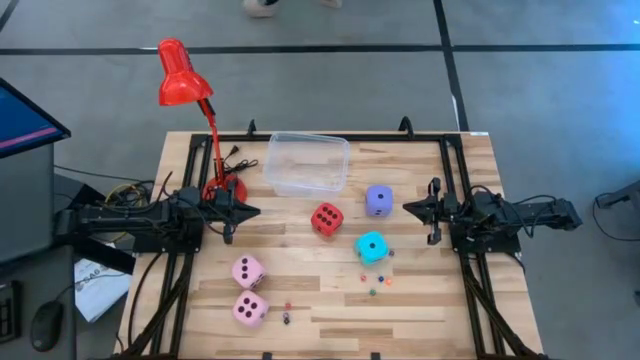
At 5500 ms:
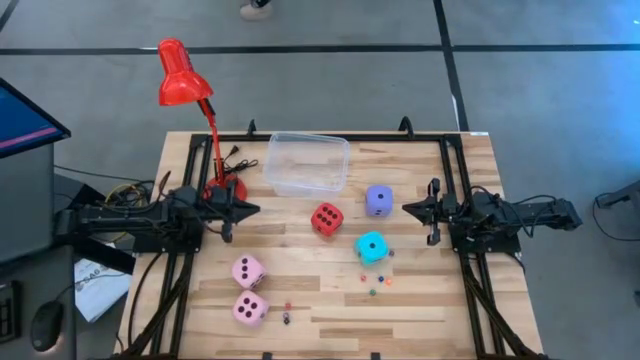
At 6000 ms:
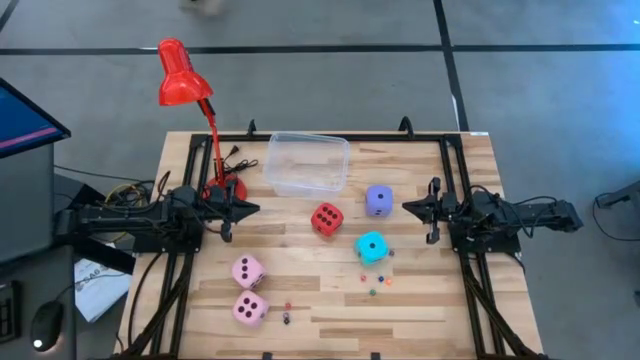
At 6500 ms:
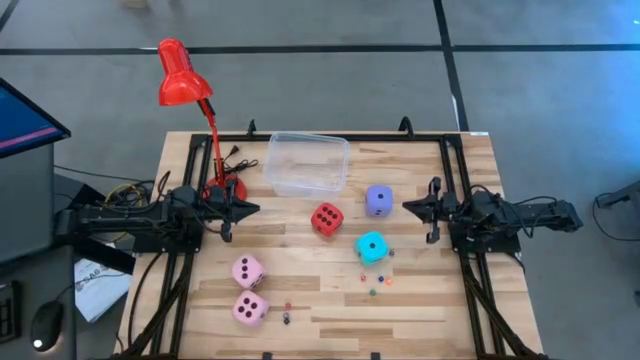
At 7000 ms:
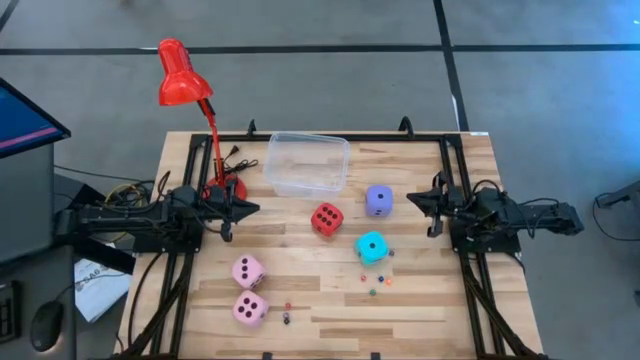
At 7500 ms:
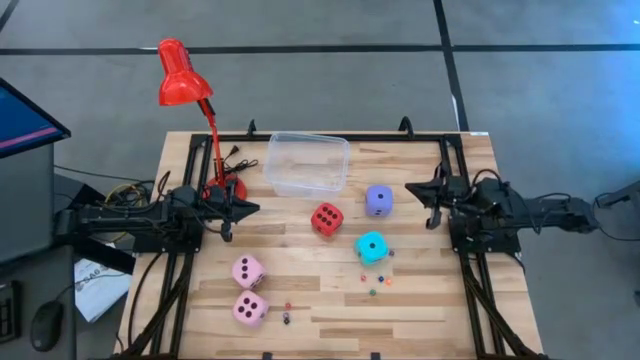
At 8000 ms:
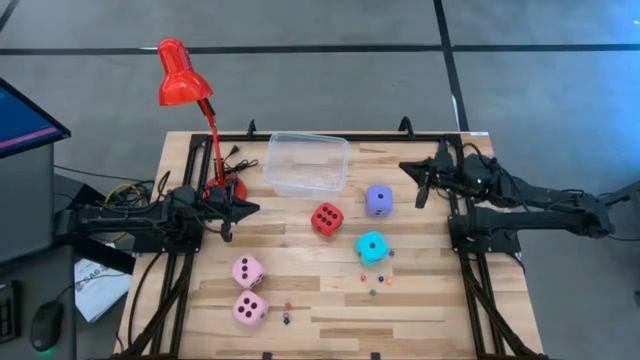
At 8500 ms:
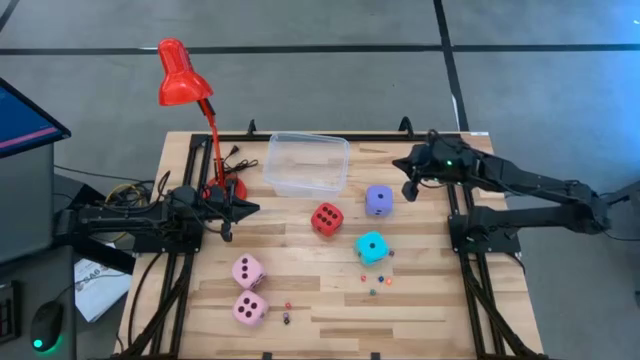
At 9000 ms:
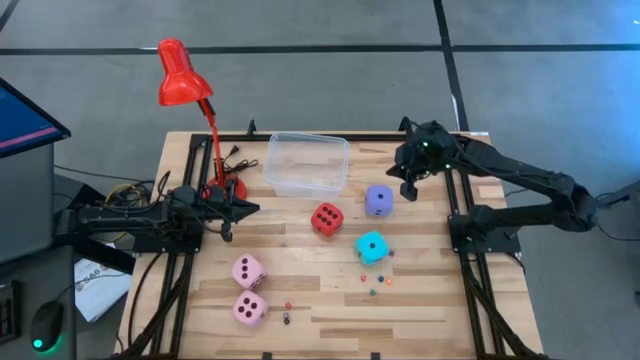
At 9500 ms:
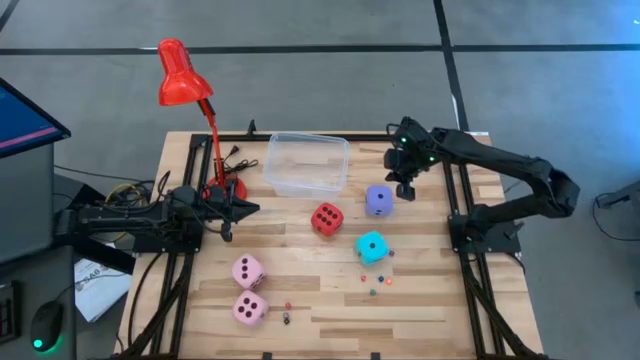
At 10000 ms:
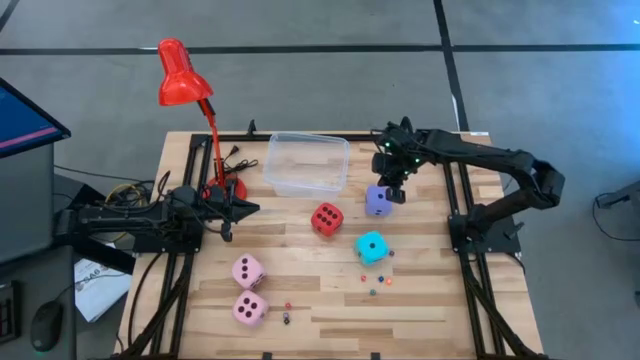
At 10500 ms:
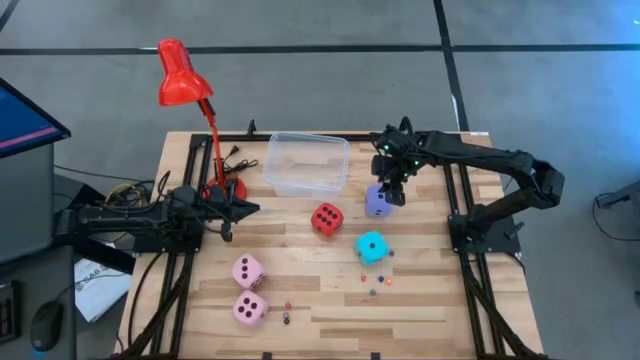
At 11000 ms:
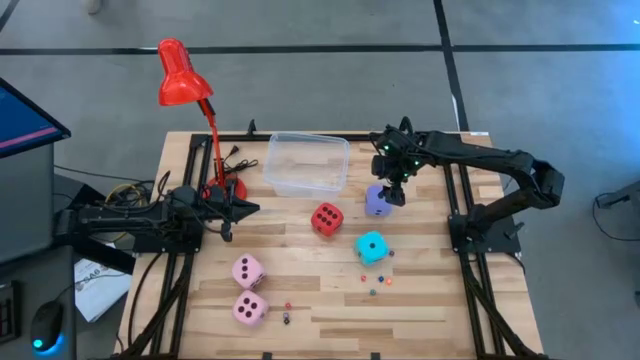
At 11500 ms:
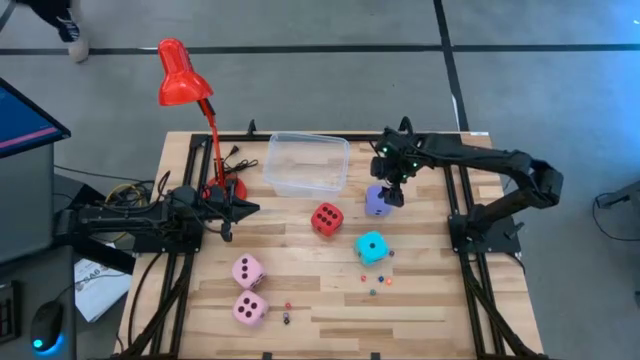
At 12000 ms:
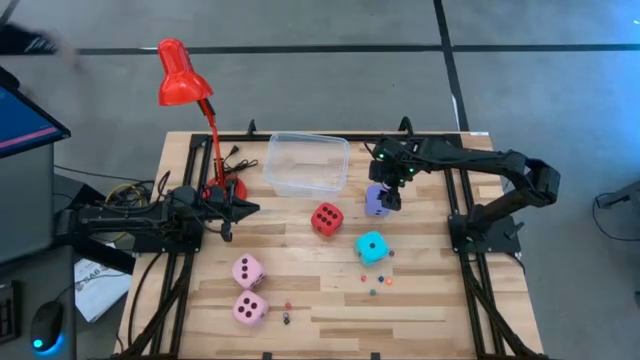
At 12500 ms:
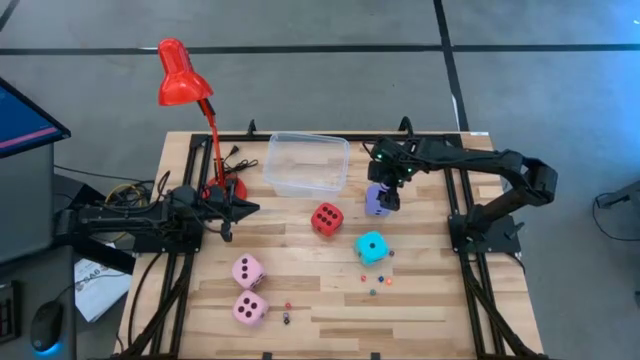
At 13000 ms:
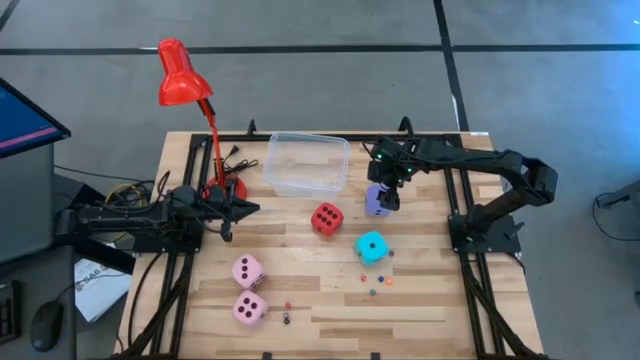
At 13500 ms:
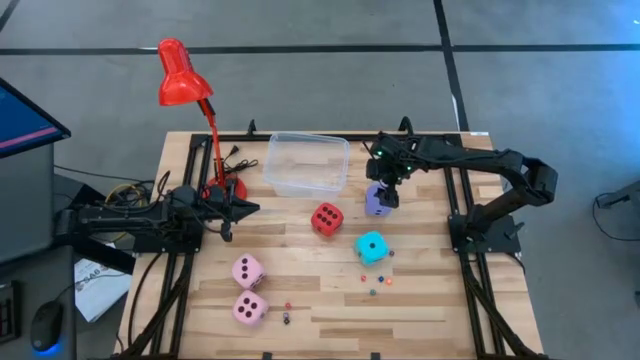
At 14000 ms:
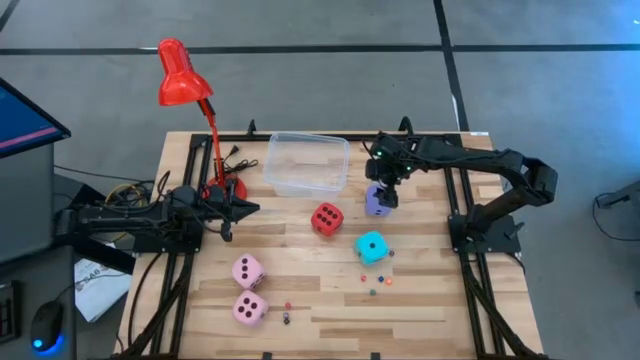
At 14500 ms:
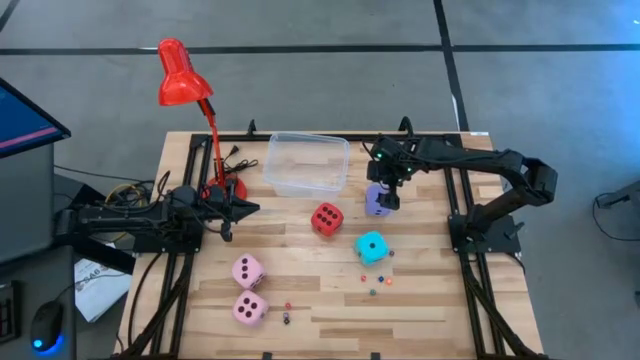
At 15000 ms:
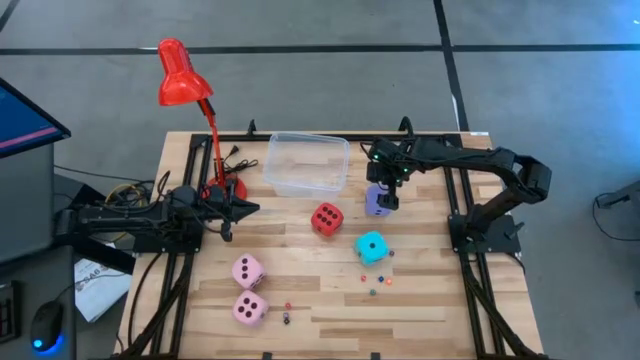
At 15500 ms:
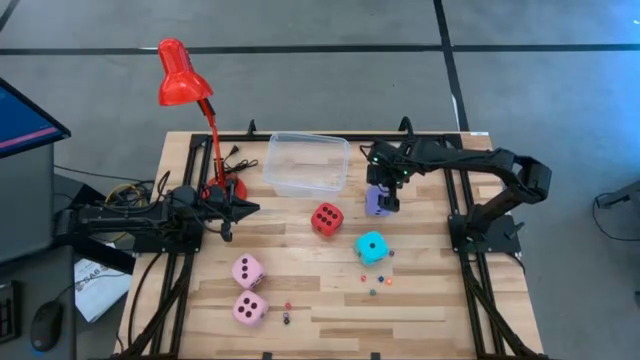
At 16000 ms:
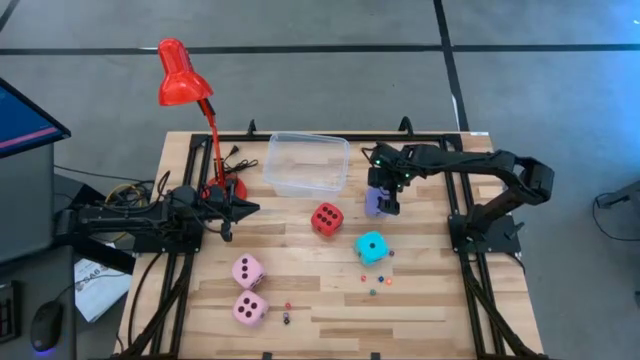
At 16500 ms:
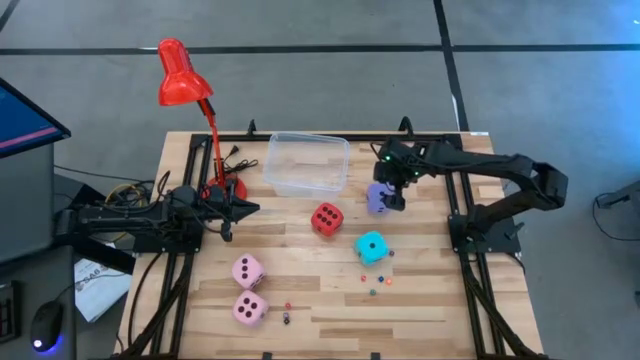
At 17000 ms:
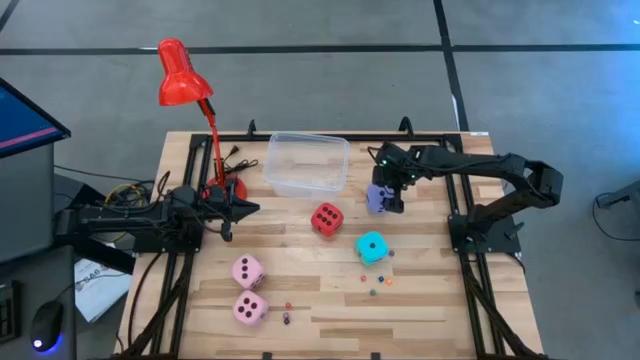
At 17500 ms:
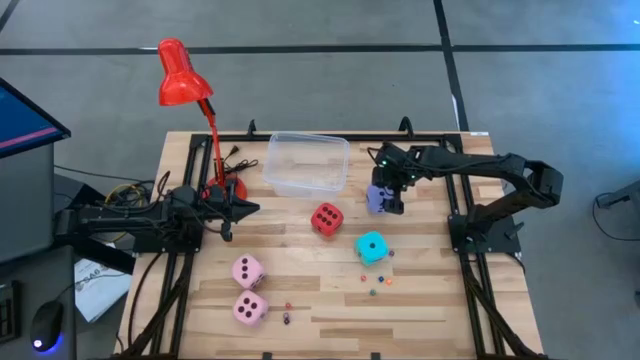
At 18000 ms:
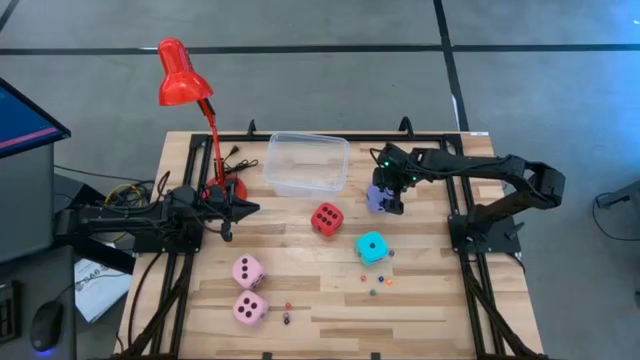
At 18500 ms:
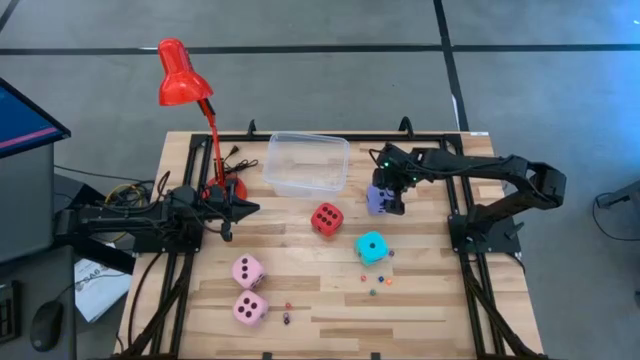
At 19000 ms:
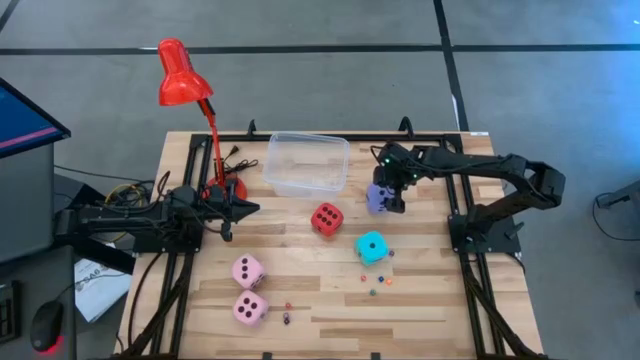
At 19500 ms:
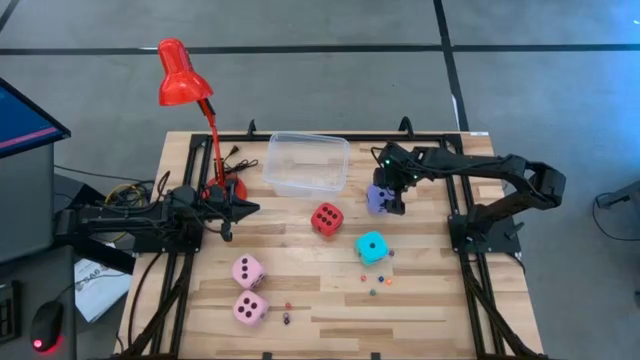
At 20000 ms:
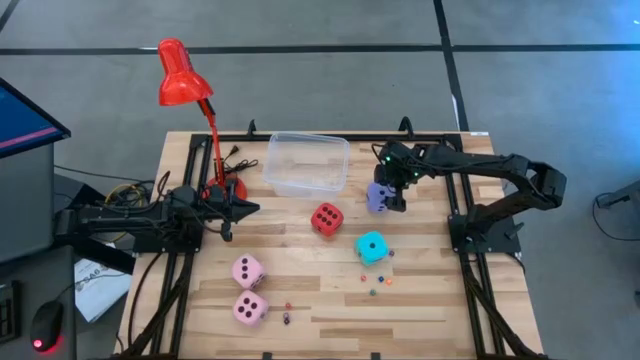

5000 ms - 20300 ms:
Task: Pick & Place Dice
Put the large purple die into the transparent bin

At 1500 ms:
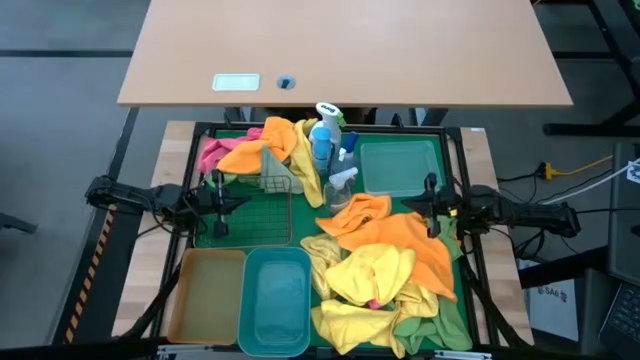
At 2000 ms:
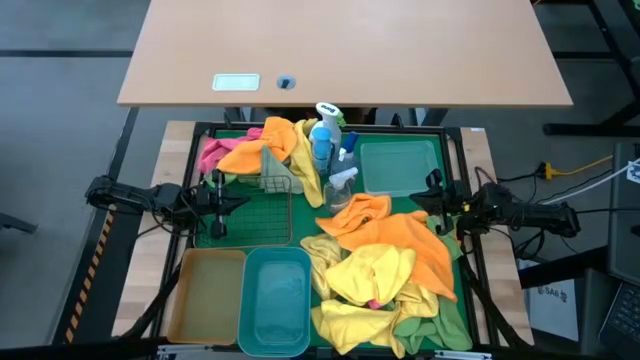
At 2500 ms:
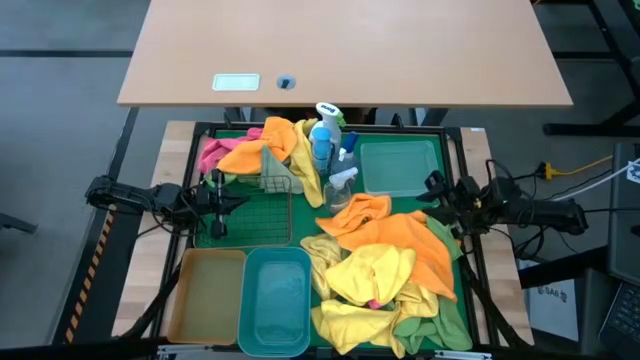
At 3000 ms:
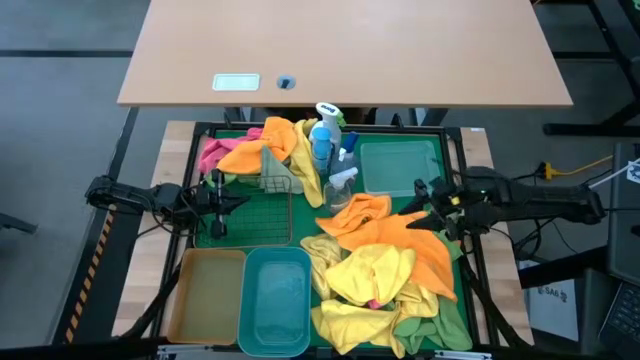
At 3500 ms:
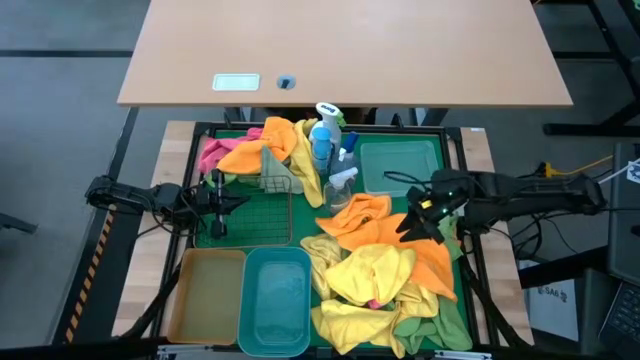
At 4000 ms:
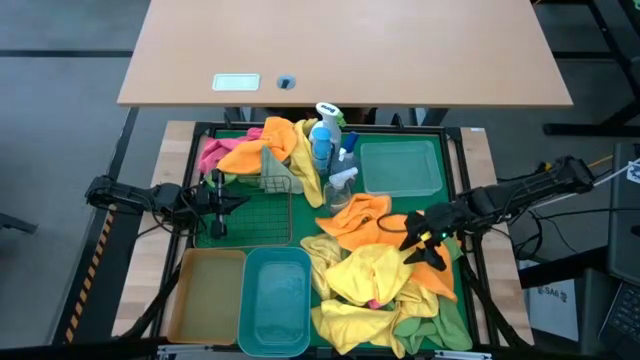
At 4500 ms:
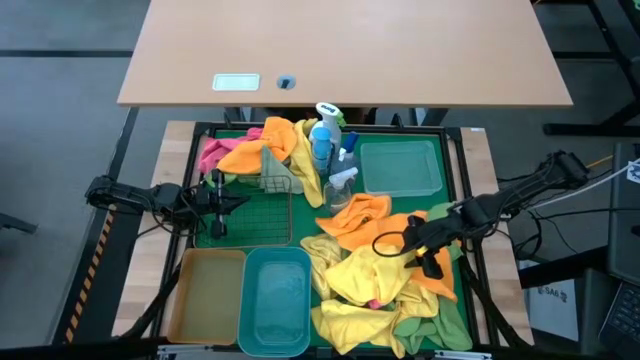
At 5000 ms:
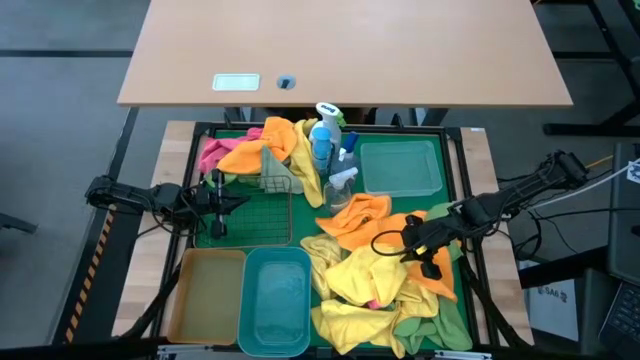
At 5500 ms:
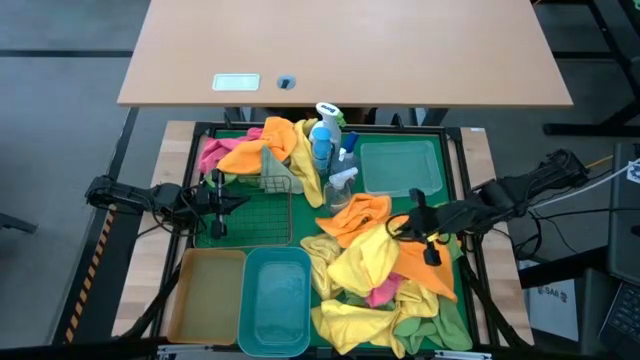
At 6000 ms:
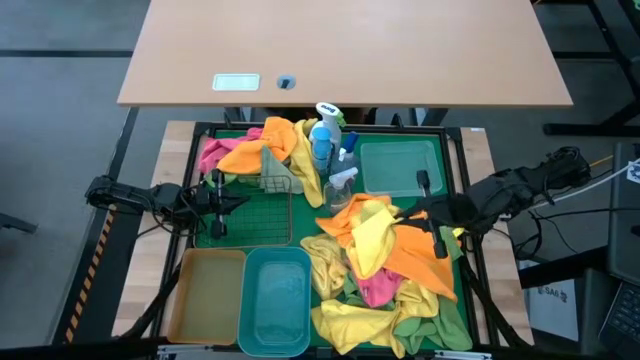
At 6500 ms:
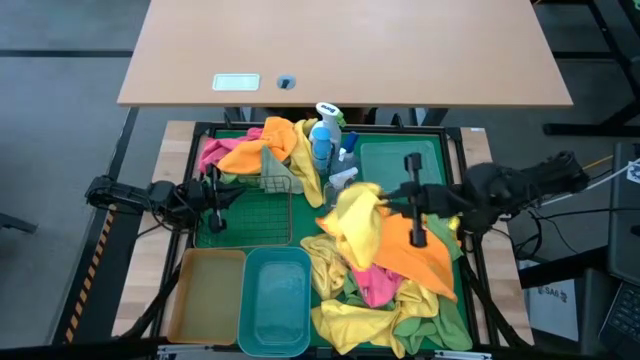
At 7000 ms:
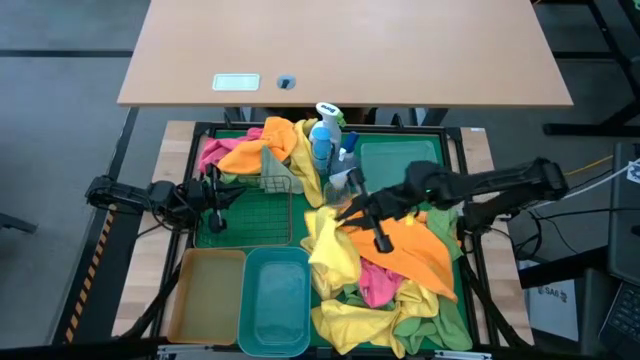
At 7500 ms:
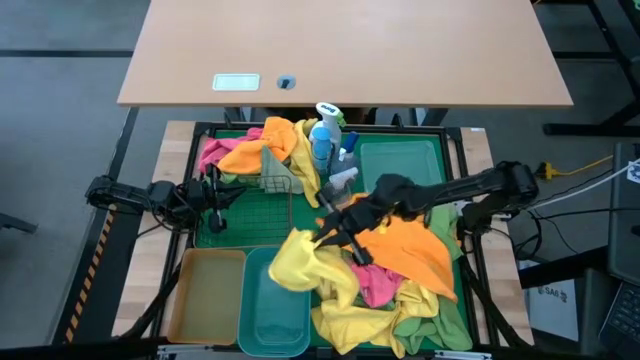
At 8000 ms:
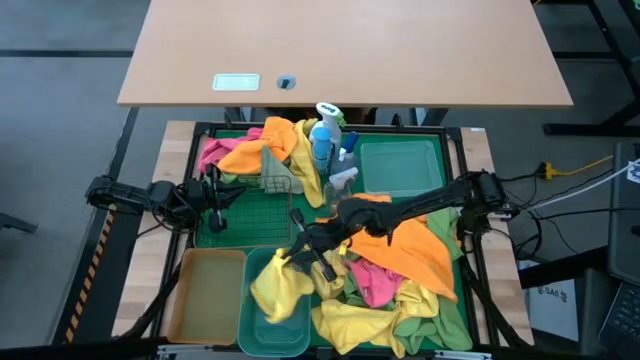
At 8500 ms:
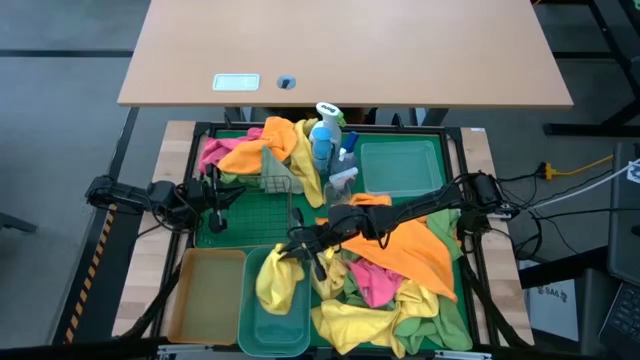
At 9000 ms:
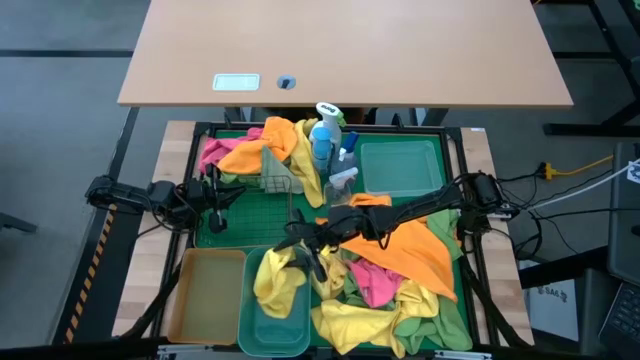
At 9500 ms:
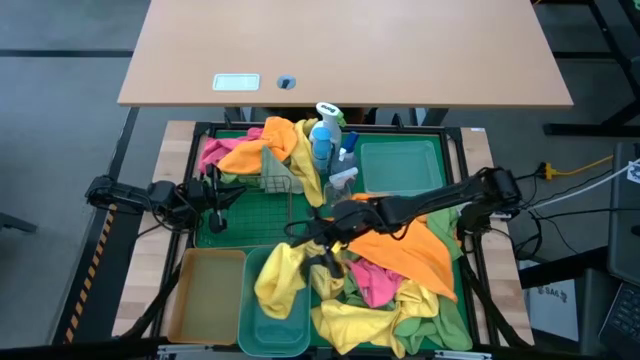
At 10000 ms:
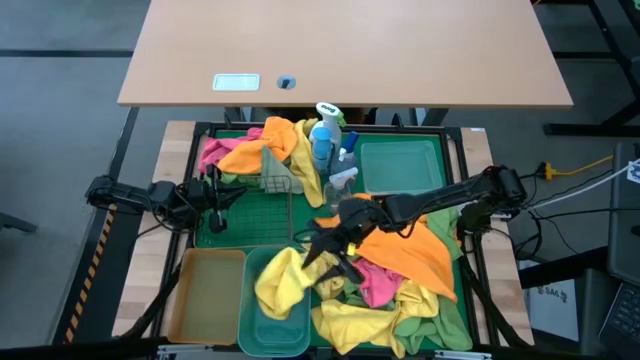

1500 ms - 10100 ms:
Task: Sort microfiber towel by color & place in baskets
Put the yellow towel into the blue bin
